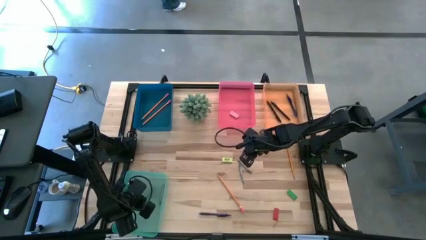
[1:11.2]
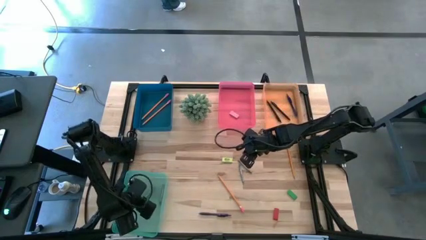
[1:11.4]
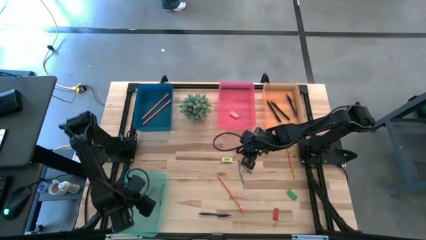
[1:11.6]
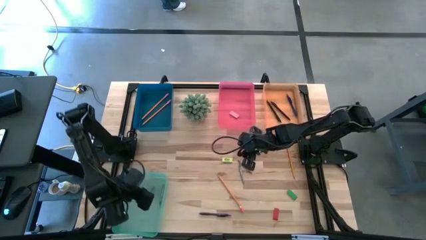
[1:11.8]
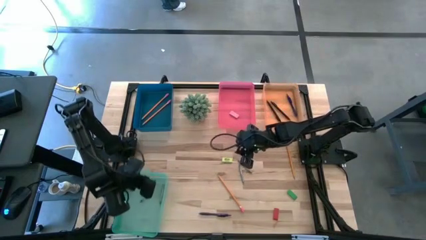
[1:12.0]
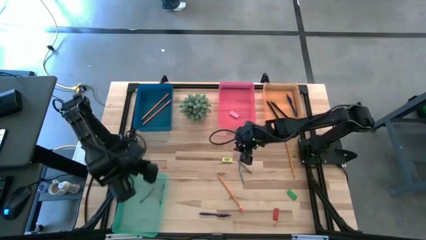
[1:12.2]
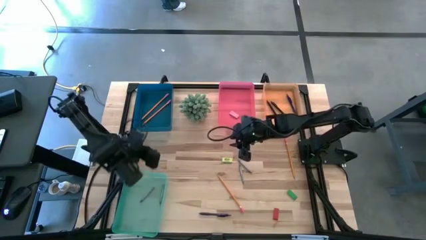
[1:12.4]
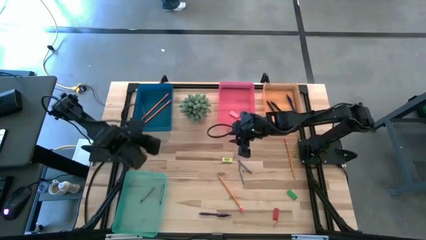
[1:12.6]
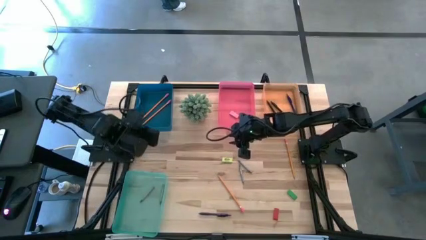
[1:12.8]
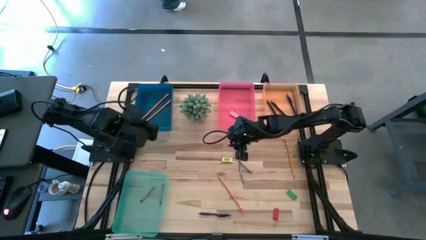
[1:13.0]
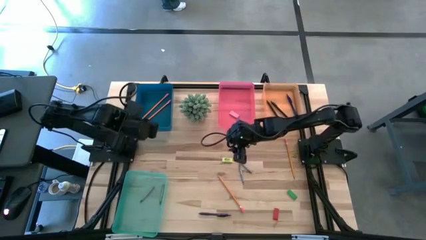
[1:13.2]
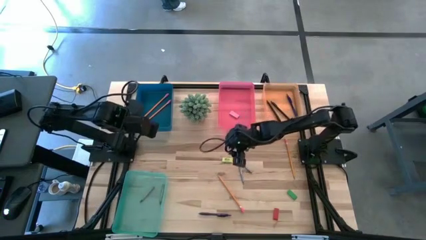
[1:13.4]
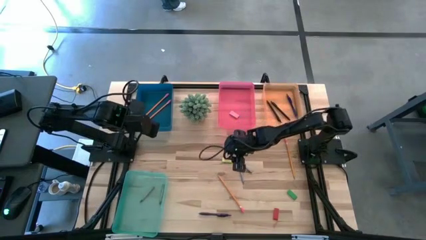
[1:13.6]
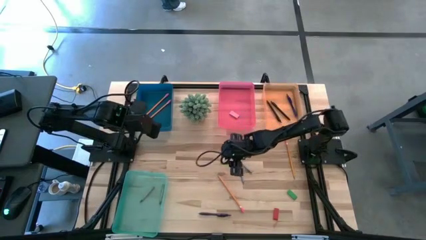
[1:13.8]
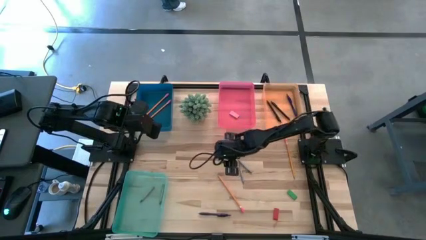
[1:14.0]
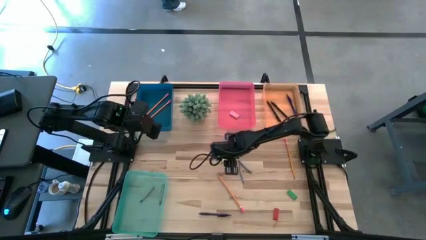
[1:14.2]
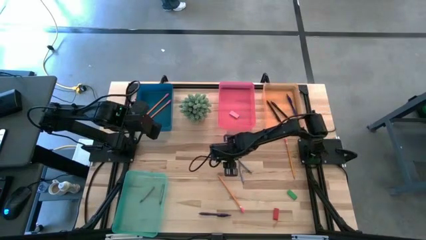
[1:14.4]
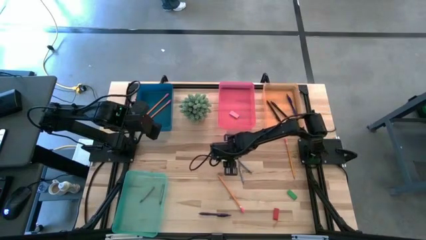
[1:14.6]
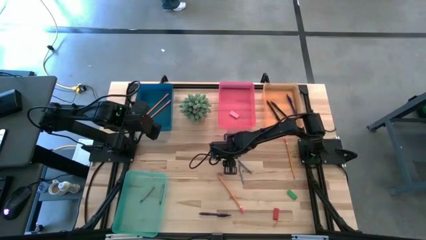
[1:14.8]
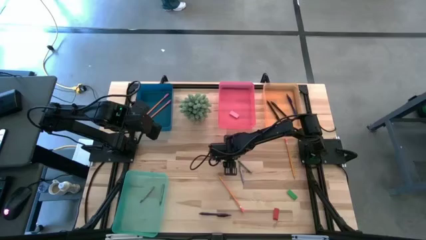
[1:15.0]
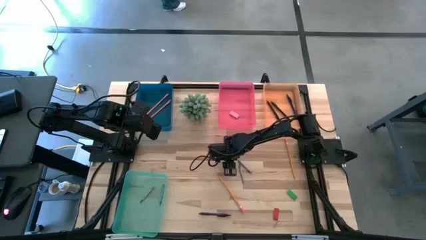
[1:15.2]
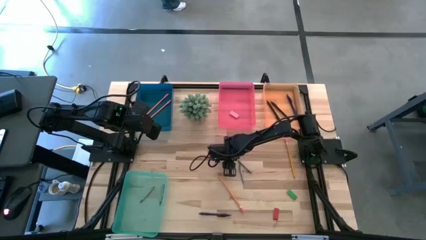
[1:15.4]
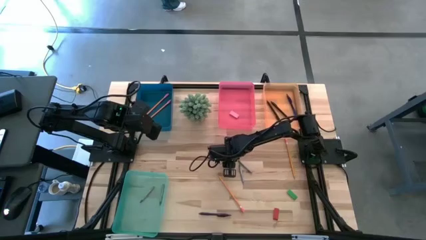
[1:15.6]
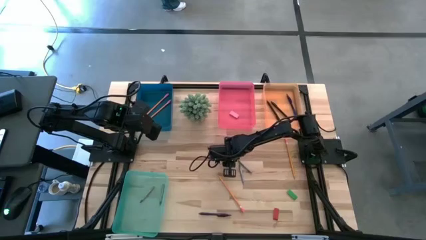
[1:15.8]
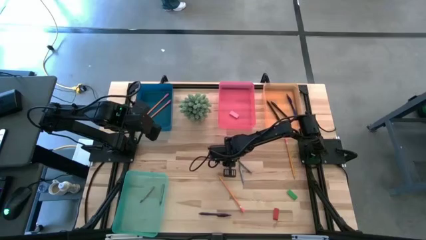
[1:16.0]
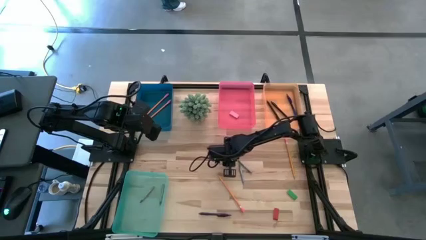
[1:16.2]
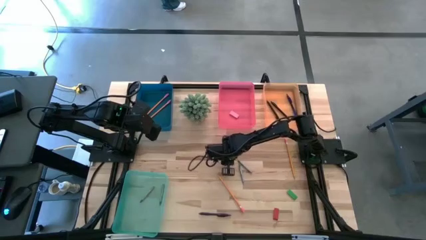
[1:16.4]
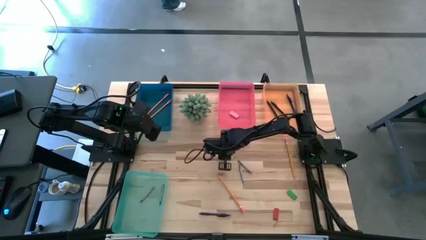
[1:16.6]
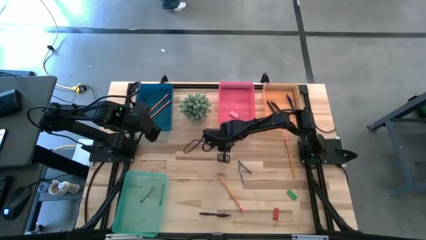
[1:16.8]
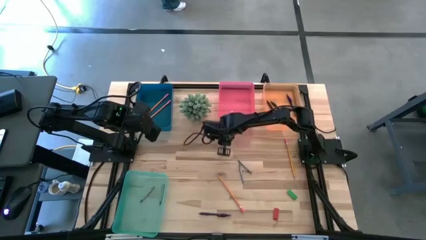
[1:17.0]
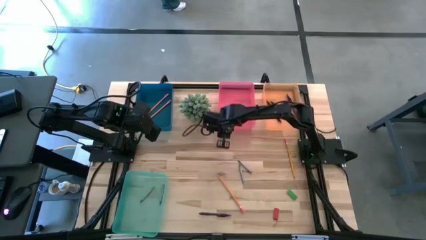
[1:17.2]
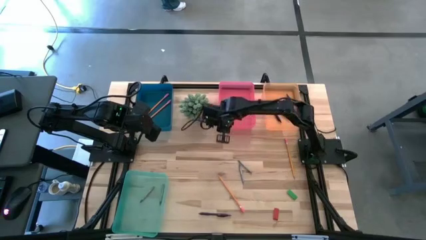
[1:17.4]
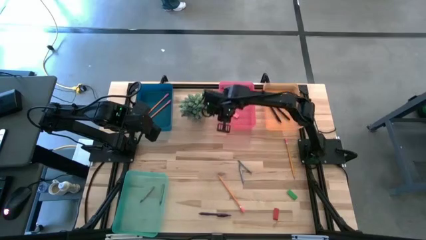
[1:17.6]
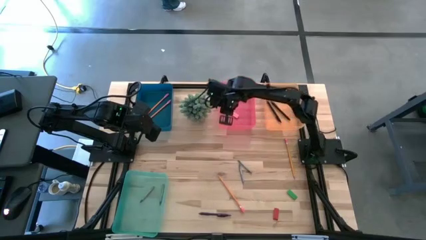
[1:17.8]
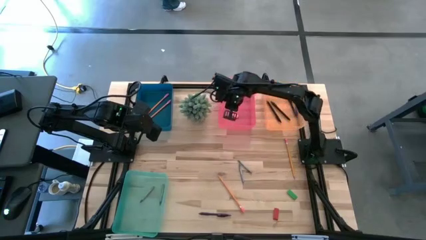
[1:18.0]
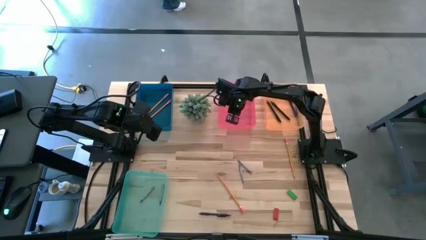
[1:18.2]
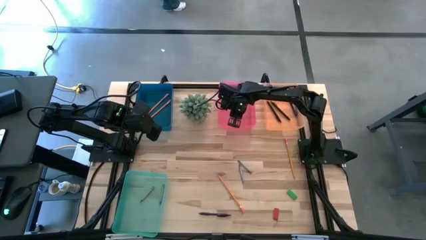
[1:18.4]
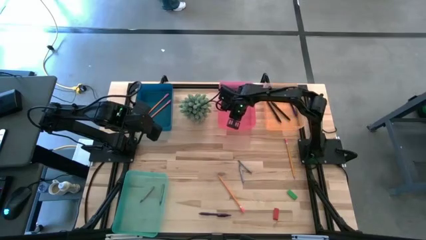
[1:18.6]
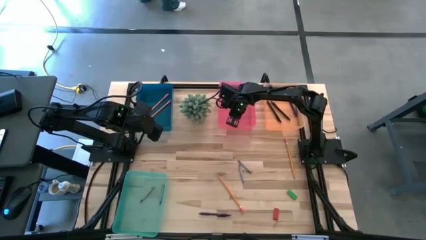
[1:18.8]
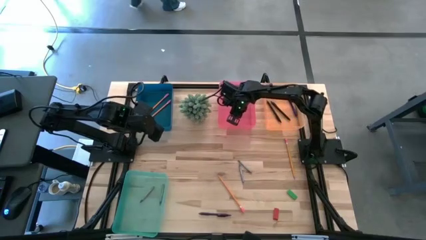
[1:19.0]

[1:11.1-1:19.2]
Task: Sort crayons/erasers/pens/pencils in bins
Put the light green eraser into the pink bin

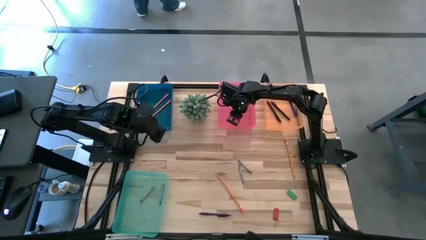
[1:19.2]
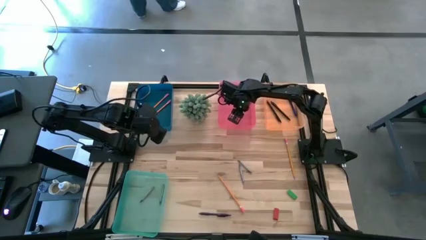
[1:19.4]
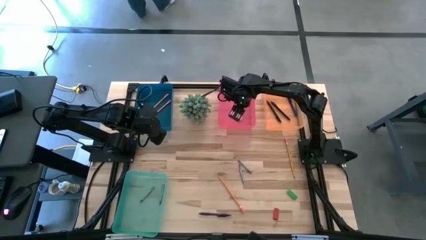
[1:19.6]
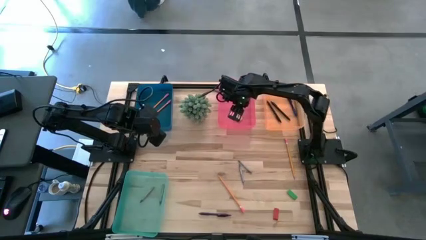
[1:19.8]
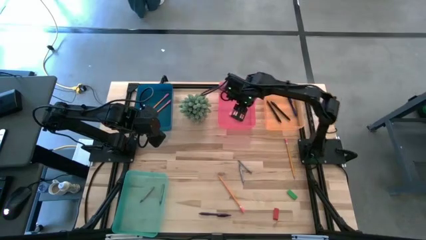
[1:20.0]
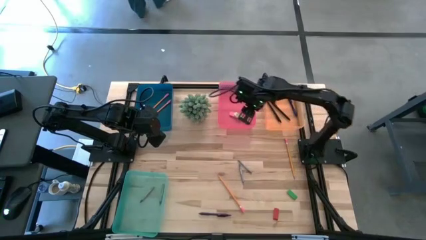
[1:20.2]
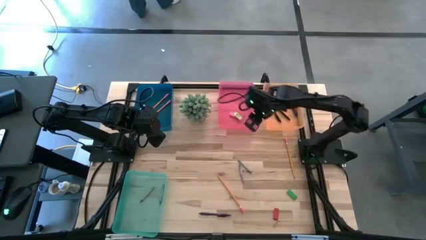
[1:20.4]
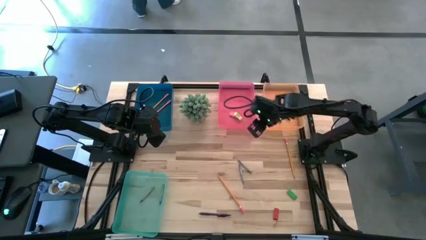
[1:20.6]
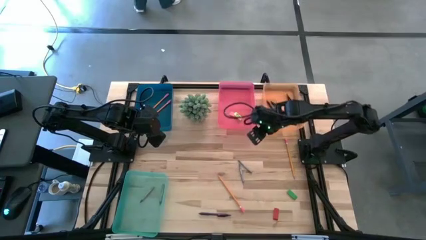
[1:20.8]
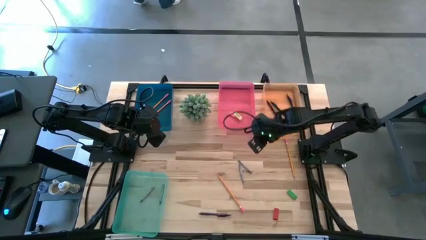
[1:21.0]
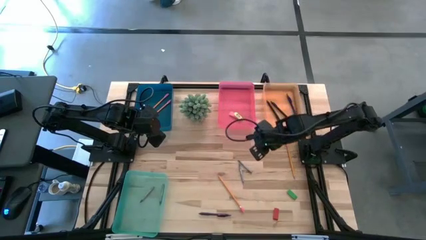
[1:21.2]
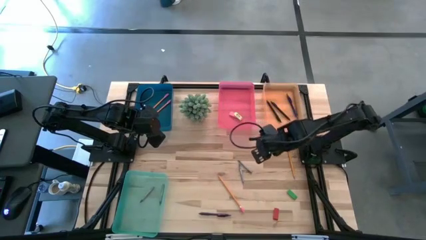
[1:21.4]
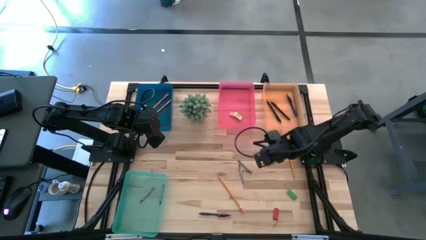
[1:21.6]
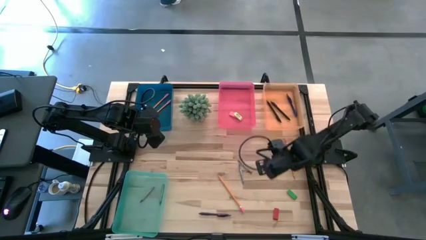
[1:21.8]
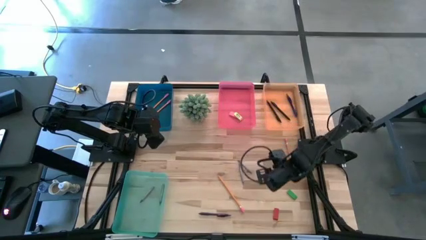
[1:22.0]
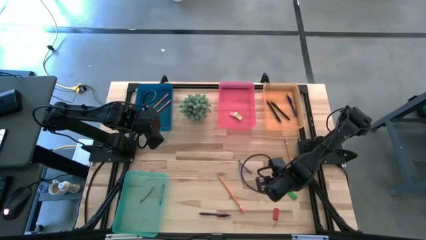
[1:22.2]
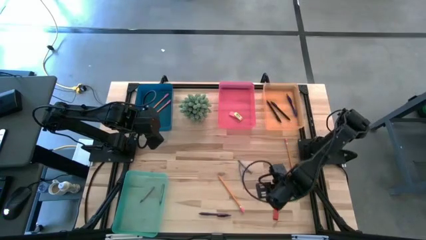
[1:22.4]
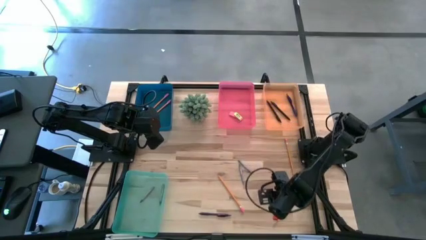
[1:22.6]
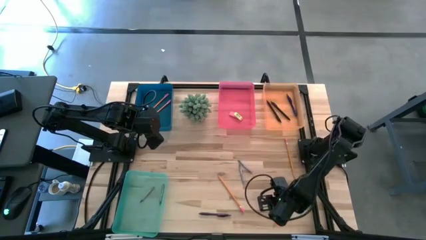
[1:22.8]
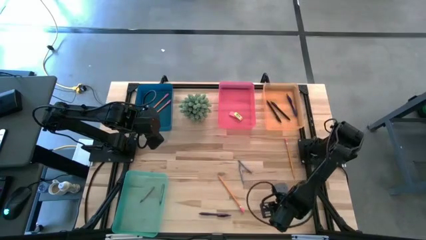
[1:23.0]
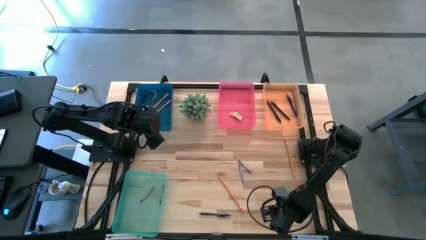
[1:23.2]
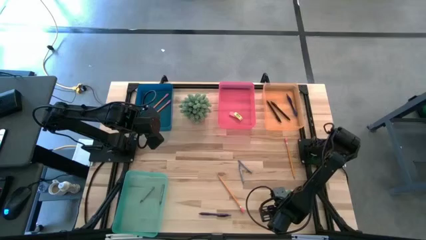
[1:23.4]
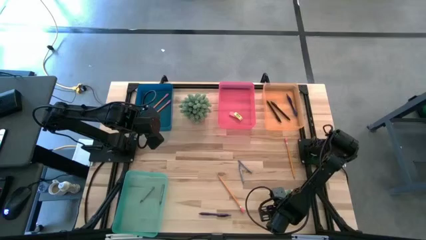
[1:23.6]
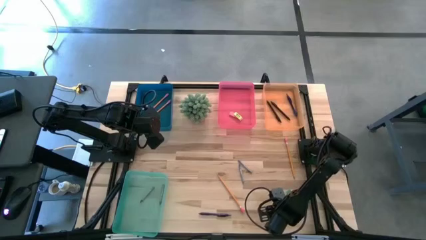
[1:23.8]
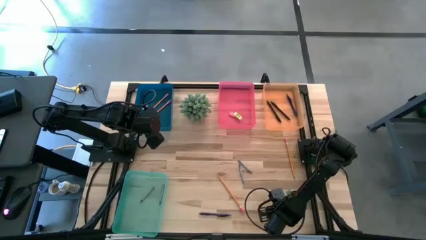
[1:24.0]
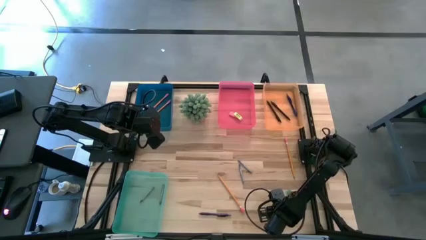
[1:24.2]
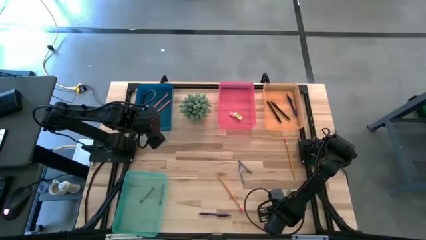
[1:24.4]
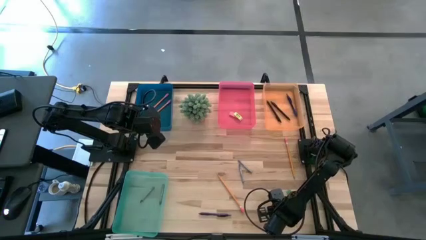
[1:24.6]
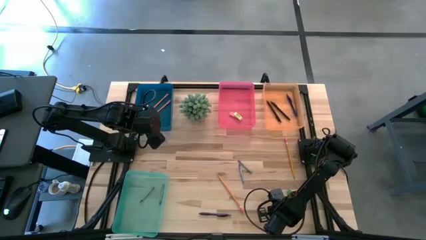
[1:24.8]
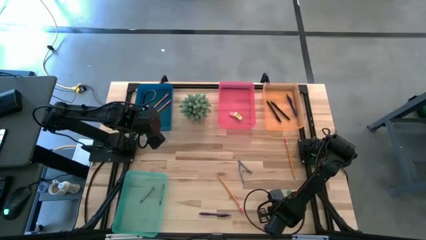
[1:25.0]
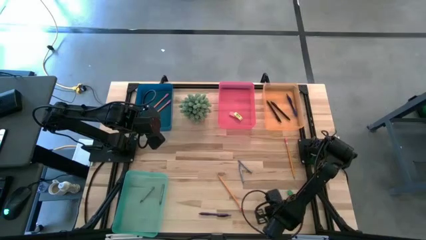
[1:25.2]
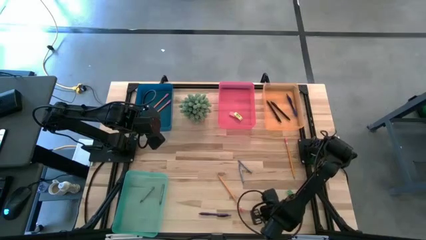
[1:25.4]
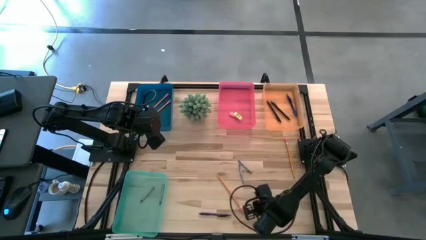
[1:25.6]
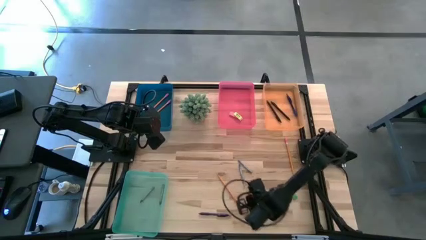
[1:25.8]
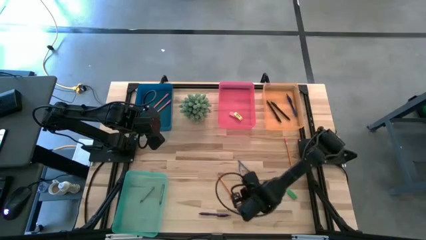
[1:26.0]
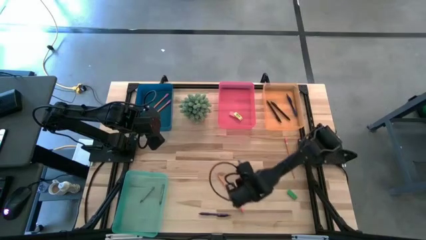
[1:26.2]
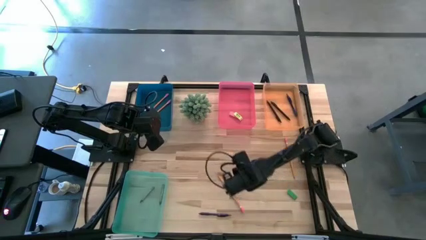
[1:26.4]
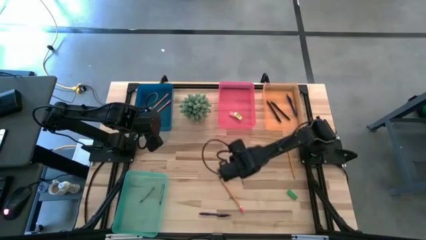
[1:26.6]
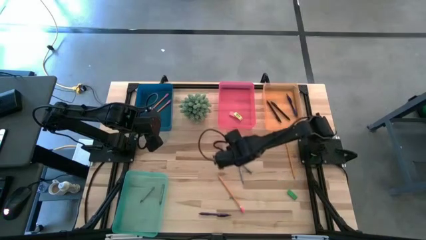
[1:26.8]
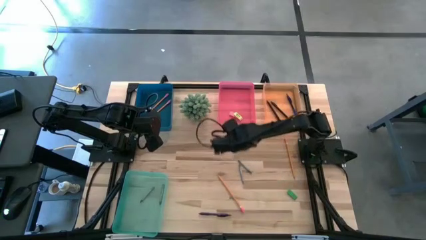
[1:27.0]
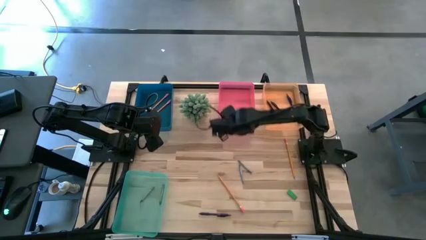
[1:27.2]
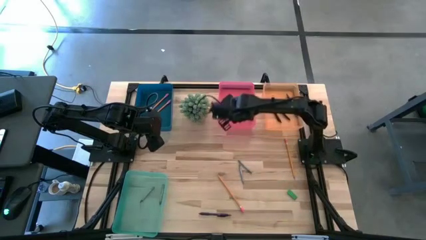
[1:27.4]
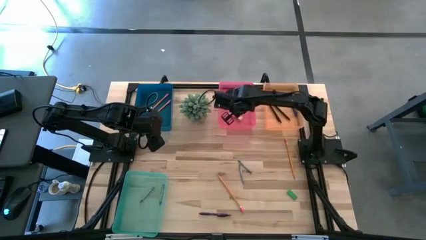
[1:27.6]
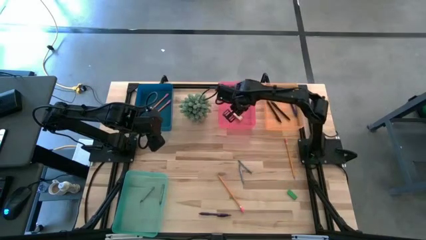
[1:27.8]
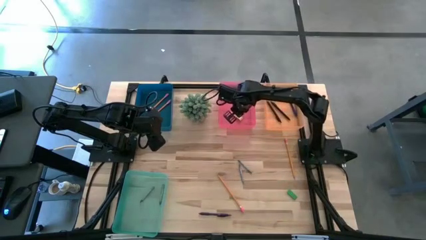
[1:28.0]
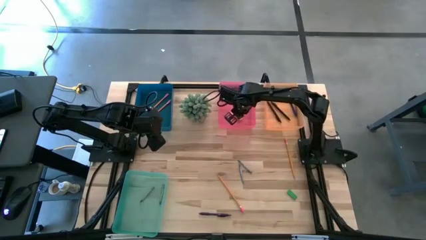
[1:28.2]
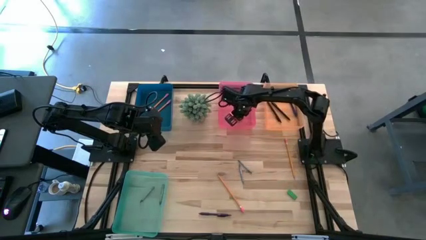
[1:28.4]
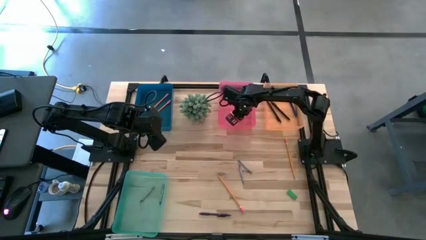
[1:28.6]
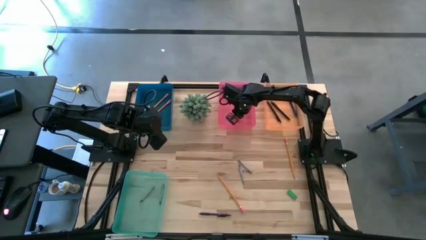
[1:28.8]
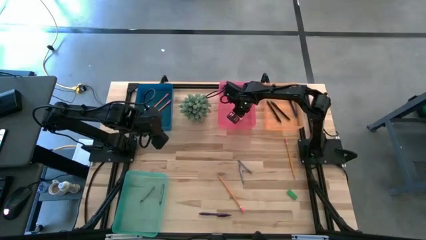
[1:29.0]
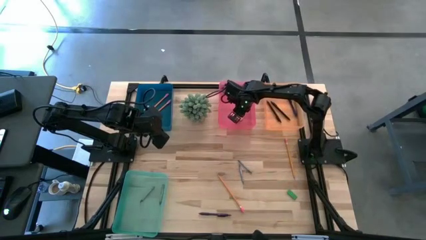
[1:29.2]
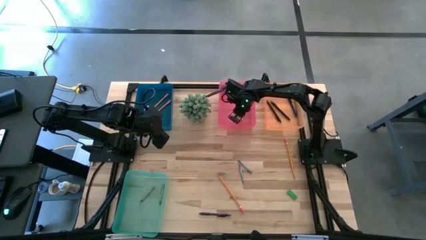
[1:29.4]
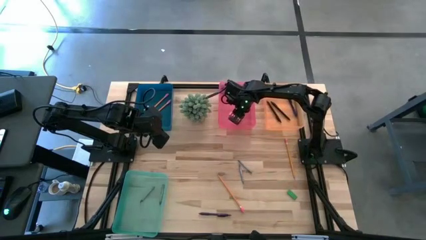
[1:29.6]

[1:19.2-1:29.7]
Put the orange eraser into the pink bin
